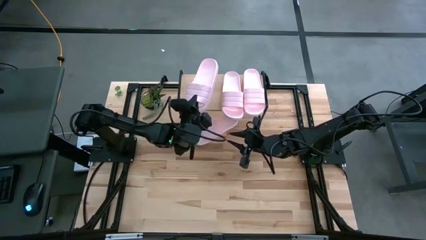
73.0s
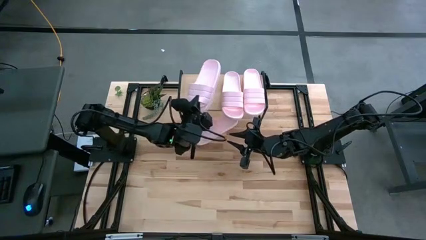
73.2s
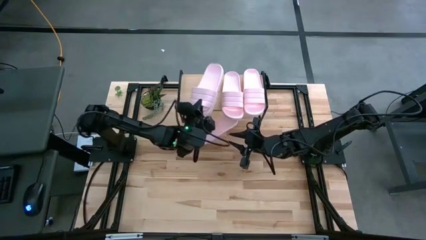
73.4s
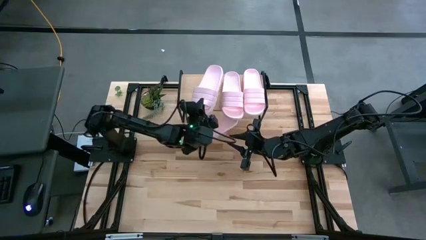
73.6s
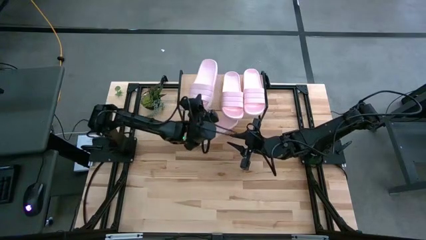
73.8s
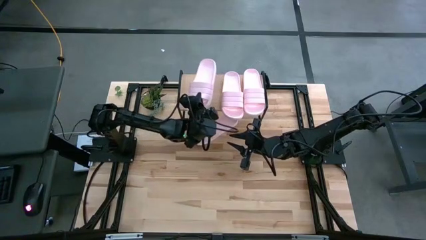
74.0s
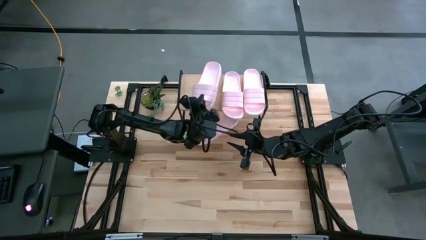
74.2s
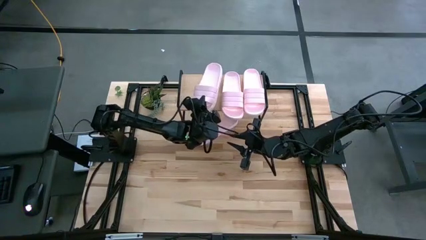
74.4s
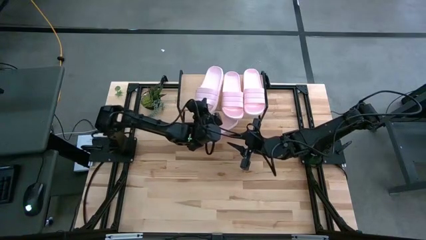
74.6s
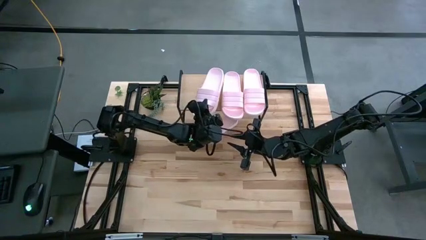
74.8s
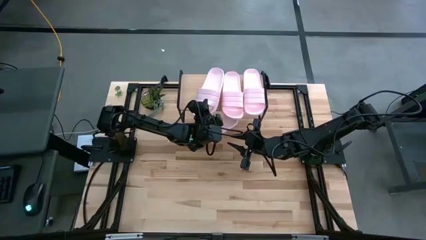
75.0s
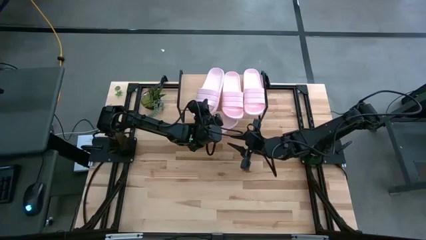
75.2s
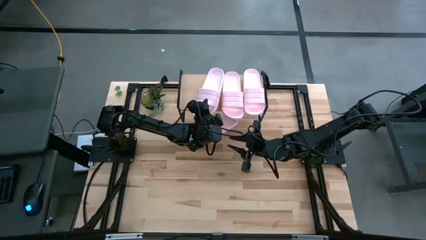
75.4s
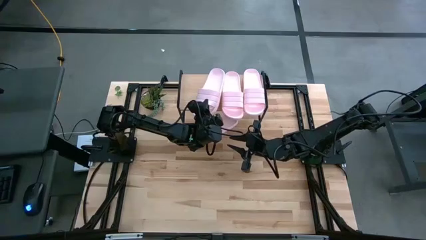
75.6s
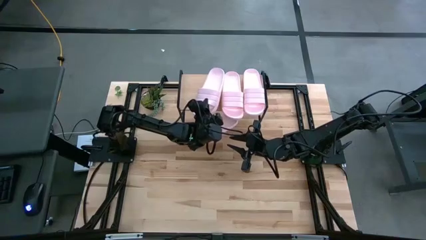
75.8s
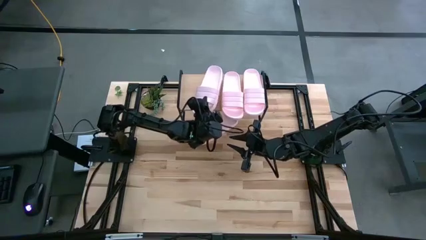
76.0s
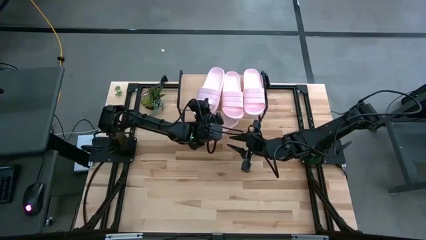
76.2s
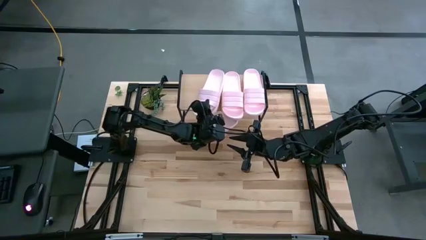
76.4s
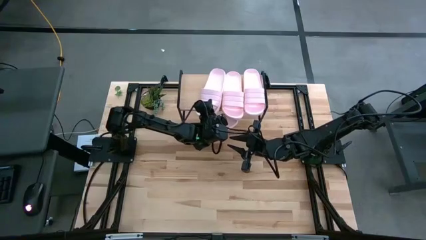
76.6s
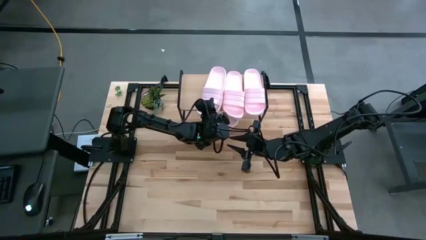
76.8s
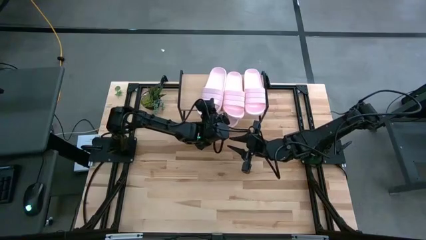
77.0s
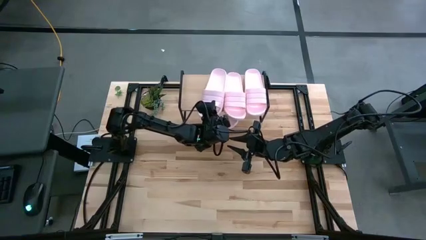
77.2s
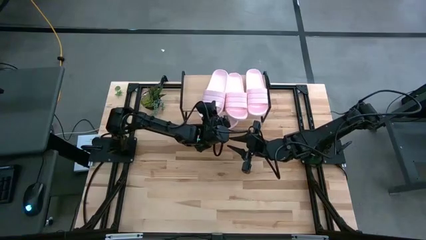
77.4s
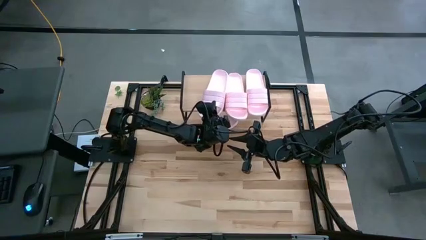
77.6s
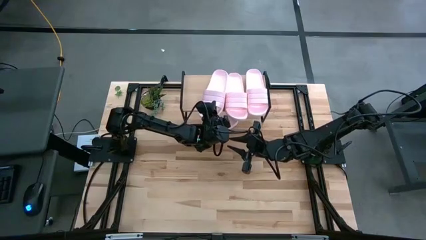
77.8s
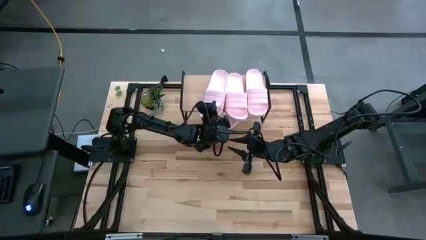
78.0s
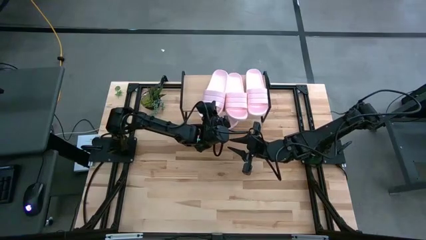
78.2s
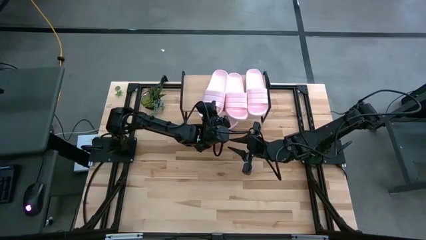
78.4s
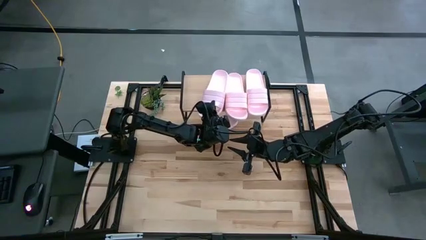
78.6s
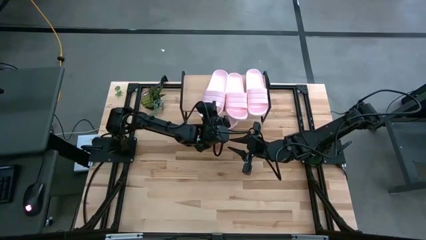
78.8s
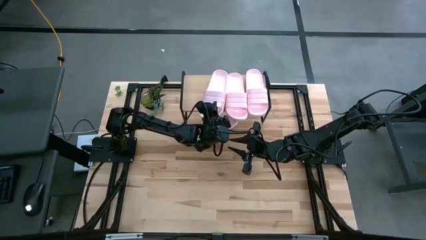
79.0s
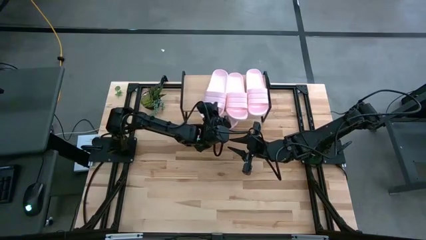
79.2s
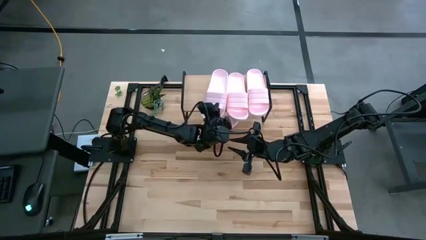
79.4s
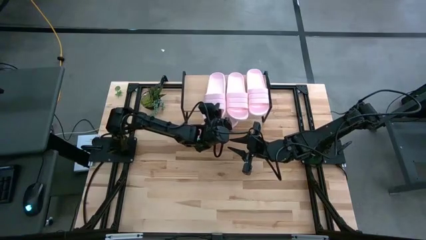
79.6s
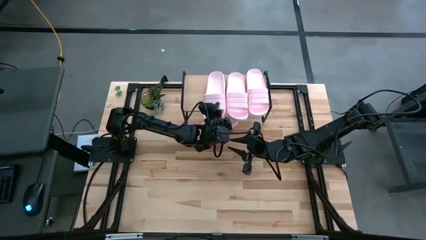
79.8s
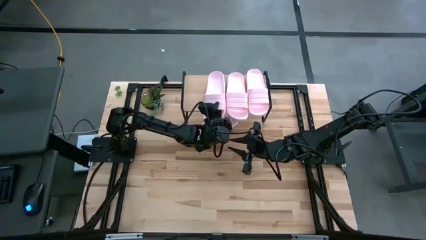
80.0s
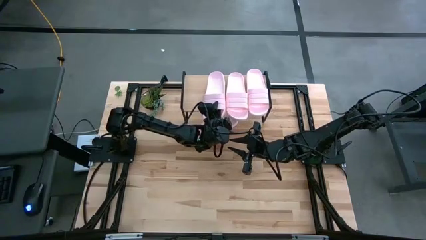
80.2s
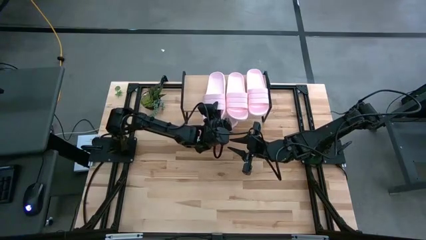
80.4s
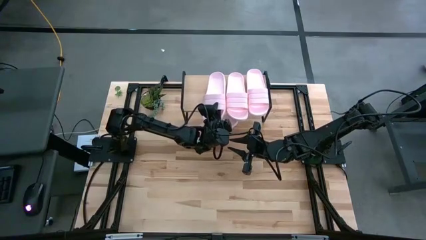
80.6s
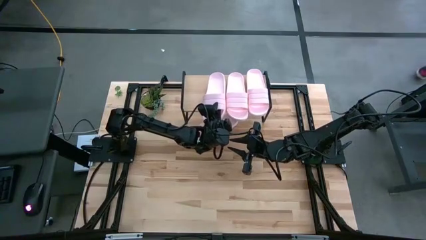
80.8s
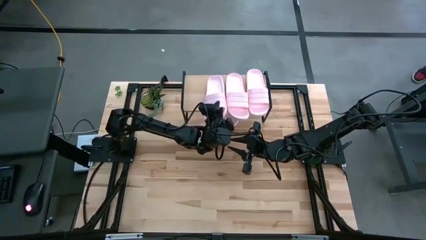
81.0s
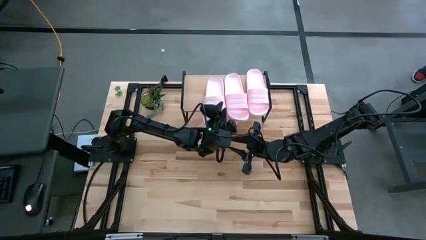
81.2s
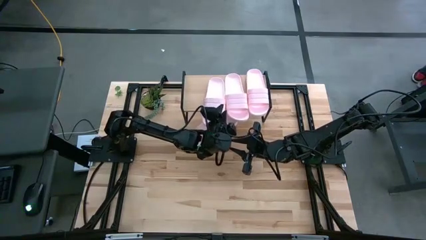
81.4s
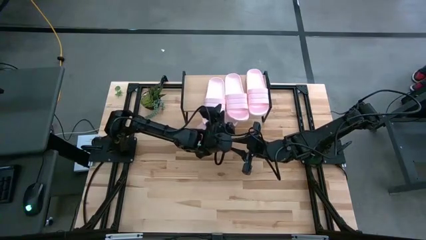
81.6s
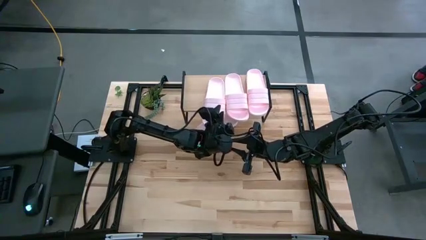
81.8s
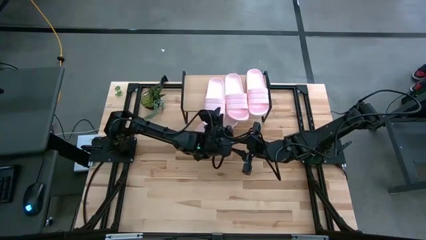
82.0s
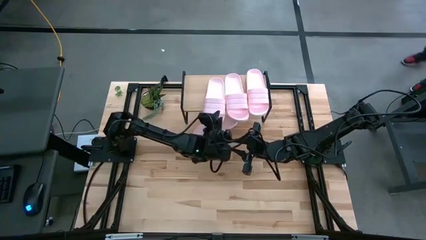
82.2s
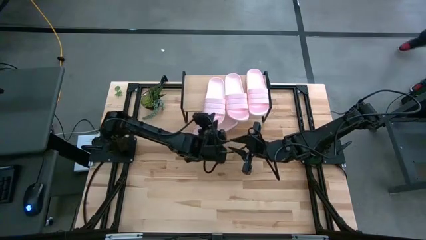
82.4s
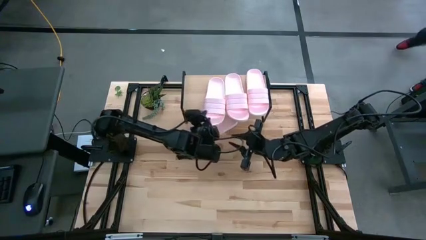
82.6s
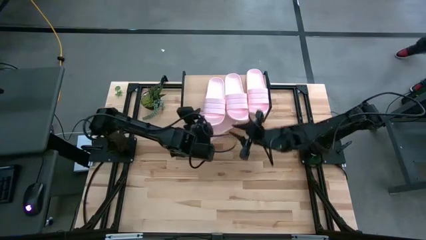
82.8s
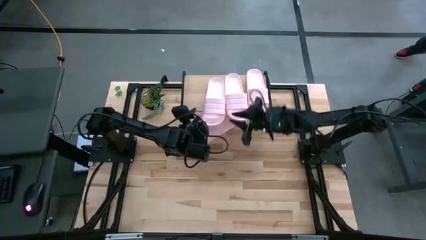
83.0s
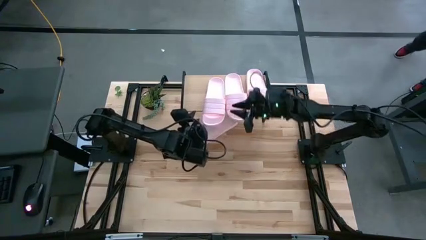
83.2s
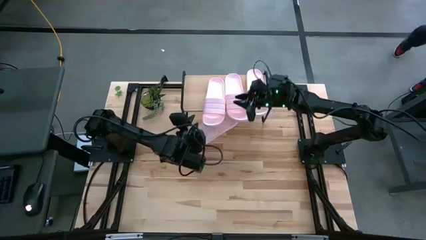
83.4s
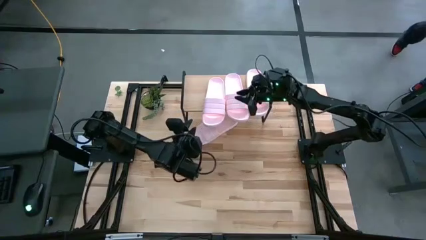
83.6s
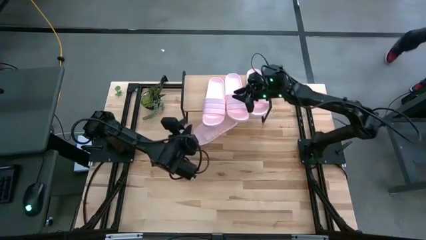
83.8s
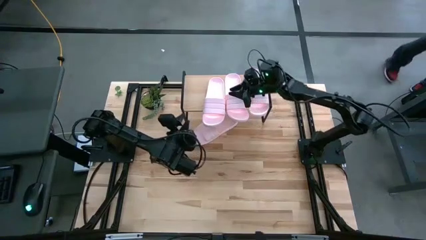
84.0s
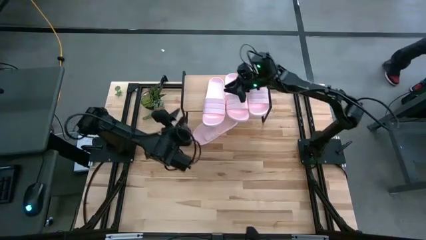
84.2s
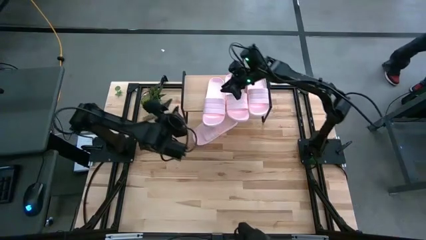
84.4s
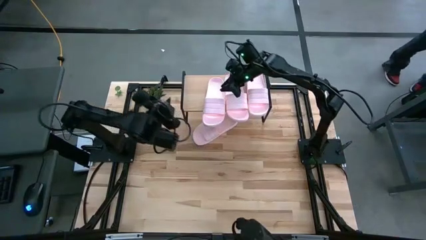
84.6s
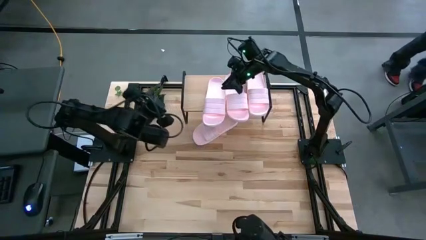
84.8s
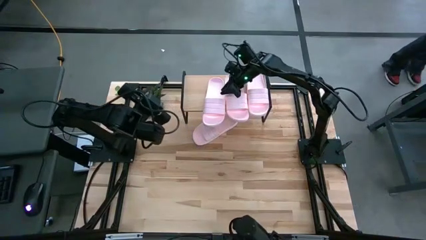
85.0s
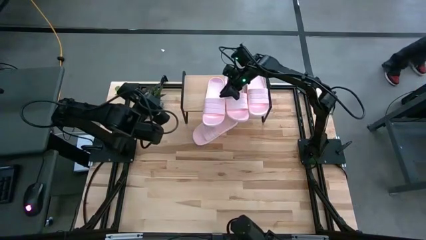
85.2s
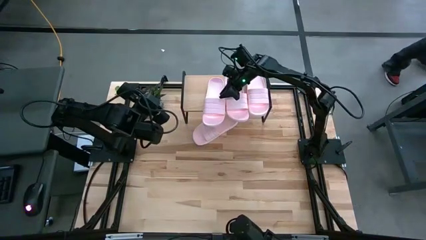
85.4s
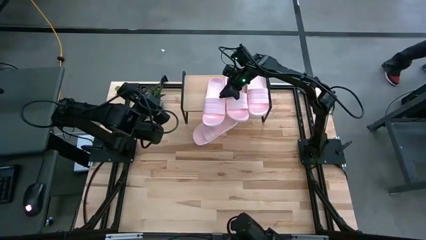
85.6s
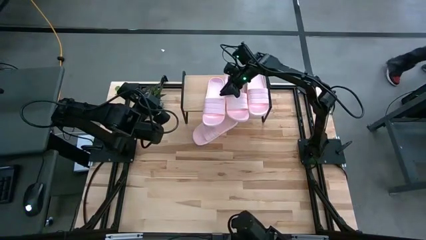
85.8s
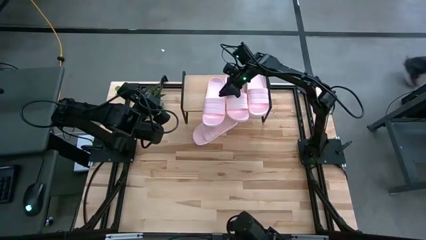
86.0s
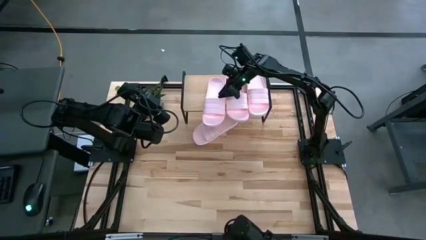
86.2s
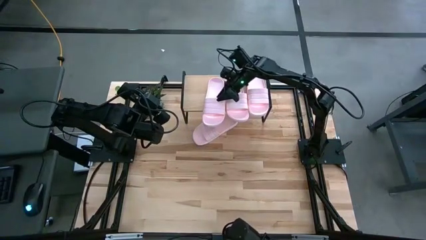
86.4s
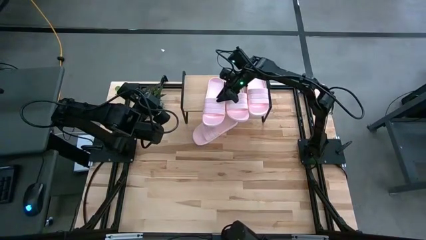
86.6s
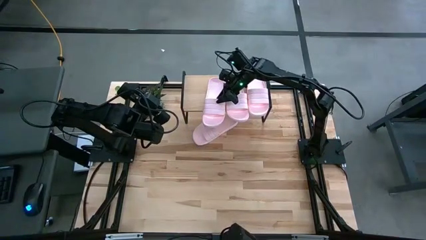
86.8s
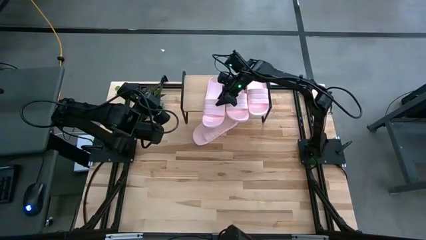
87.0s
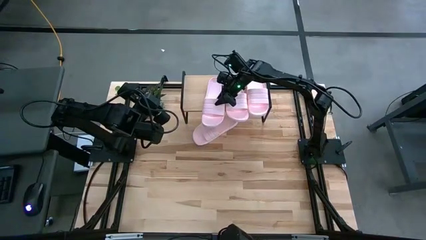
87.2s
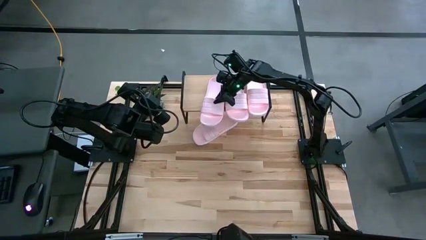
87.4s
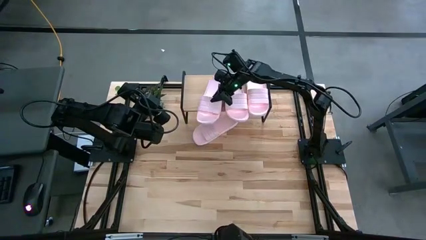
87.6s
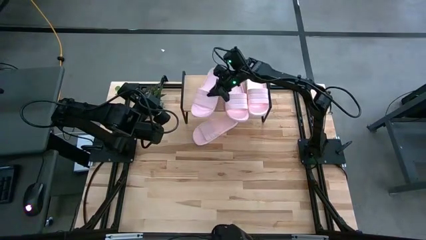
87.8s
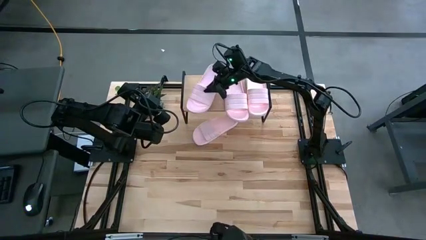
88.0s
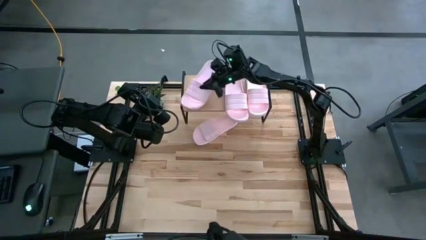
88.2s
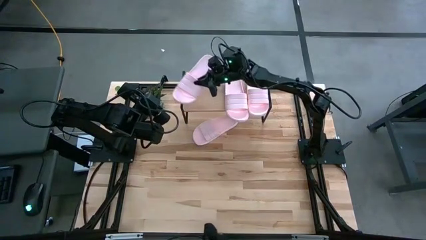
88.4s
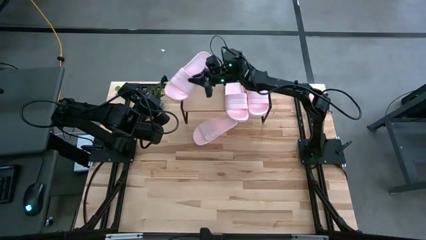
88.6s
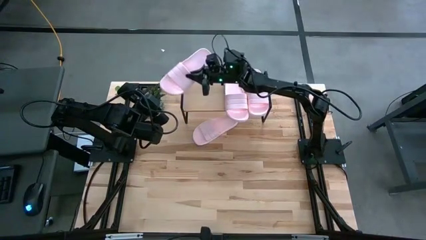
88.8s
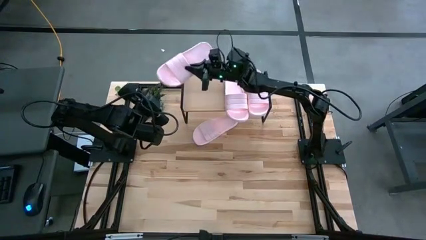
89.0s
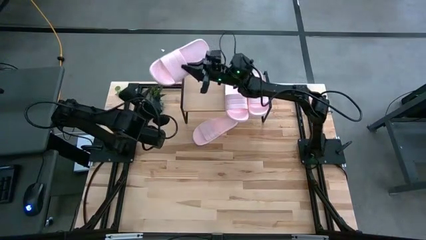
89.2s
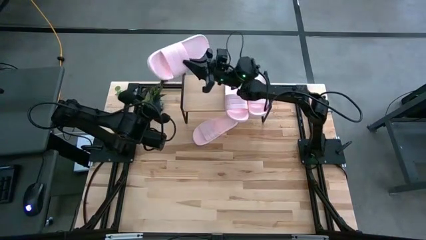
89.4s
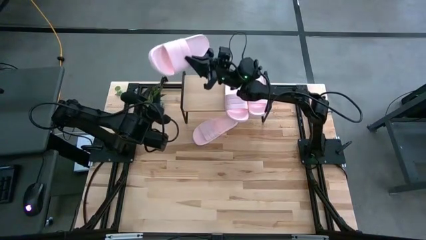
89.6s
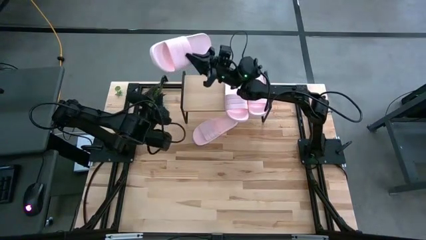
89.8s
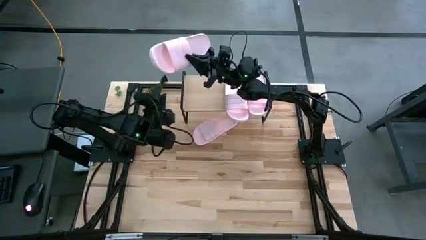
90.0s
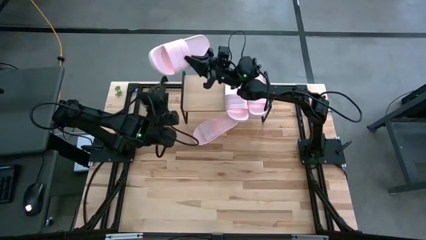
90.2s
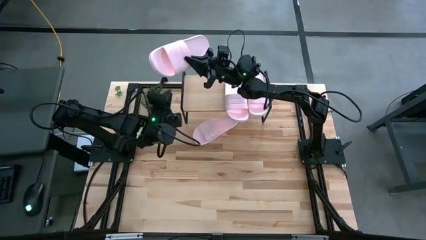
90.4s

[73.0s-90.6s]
Task: Pick and place slides into the shelf
Put the pink slide on the shelf
